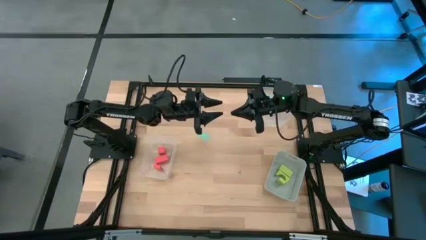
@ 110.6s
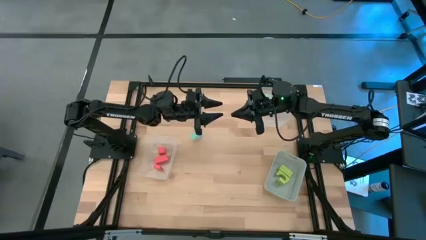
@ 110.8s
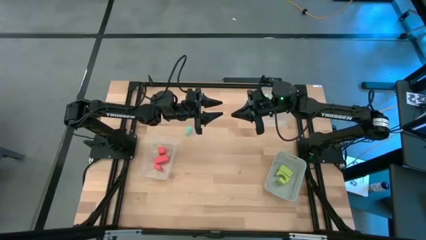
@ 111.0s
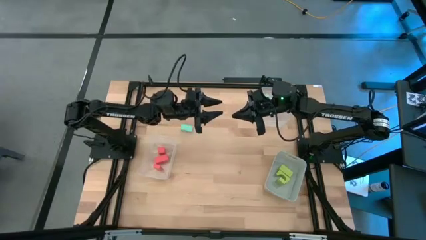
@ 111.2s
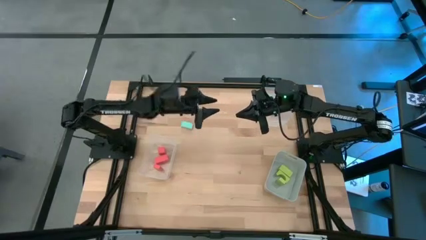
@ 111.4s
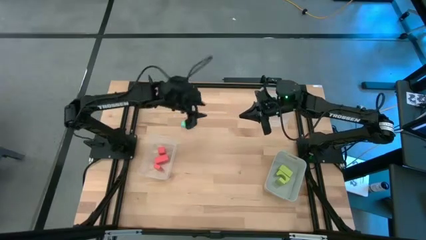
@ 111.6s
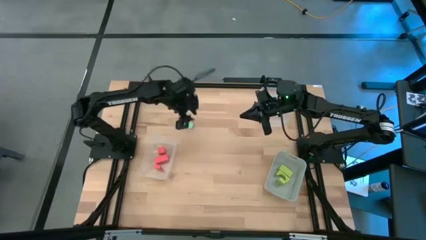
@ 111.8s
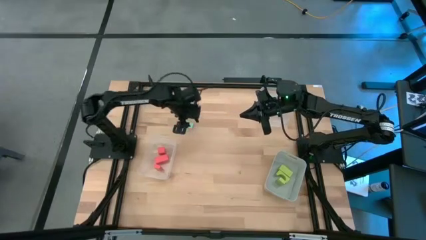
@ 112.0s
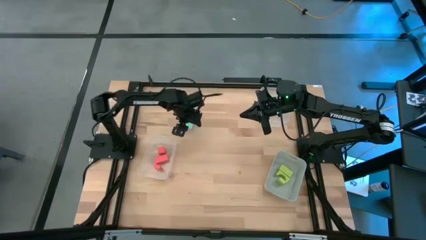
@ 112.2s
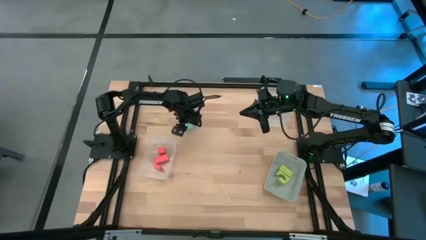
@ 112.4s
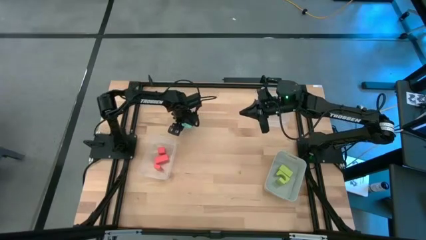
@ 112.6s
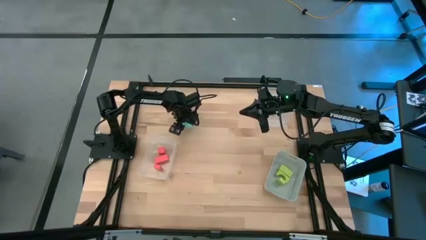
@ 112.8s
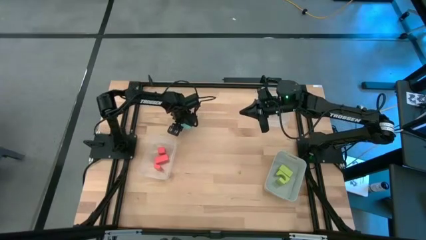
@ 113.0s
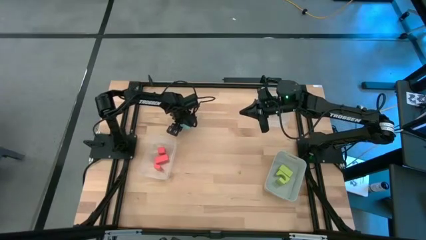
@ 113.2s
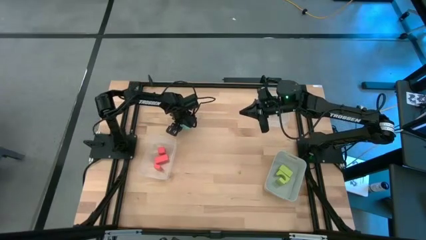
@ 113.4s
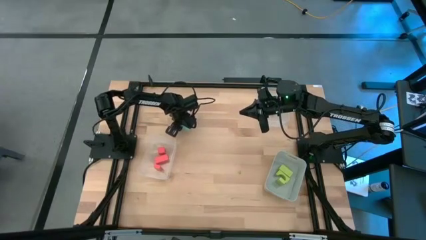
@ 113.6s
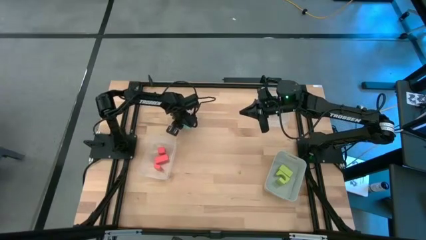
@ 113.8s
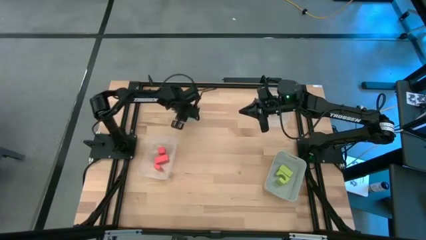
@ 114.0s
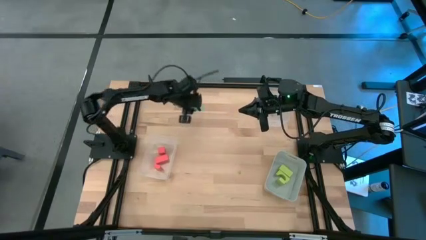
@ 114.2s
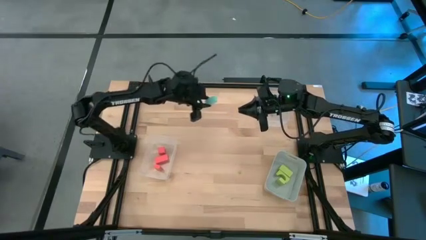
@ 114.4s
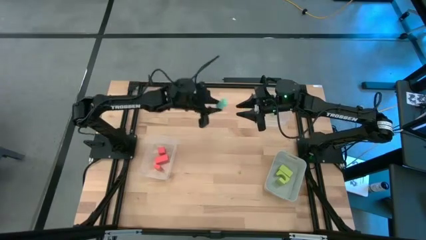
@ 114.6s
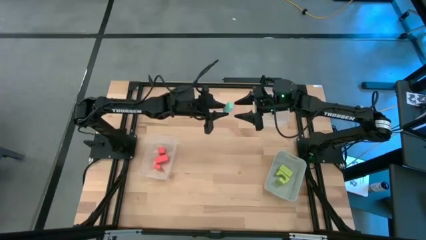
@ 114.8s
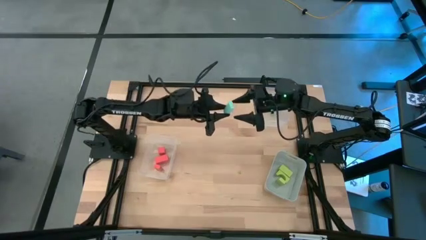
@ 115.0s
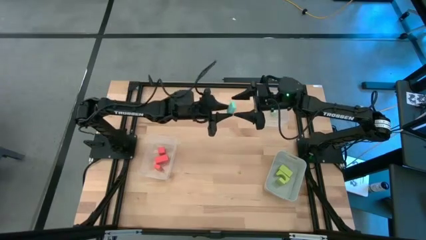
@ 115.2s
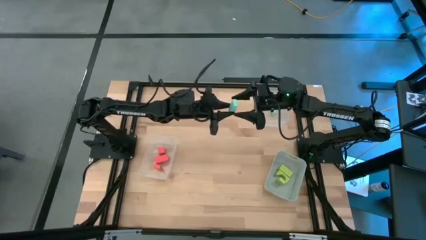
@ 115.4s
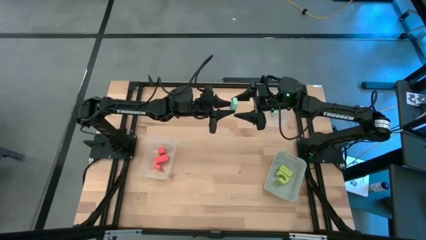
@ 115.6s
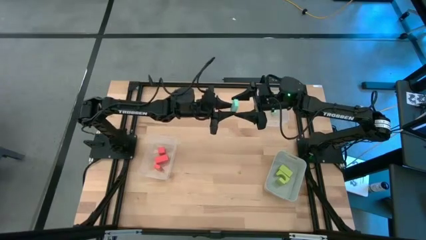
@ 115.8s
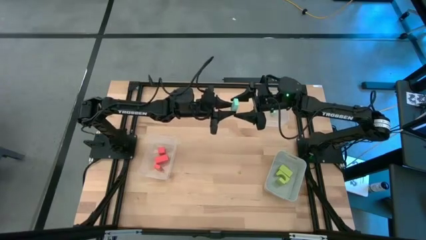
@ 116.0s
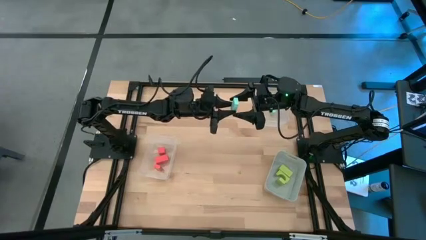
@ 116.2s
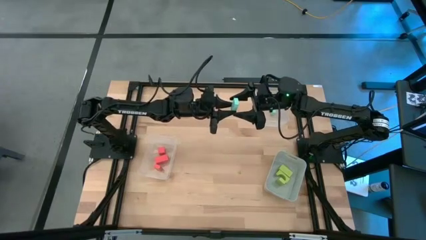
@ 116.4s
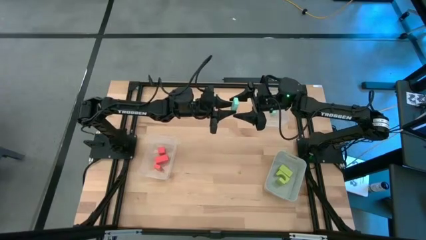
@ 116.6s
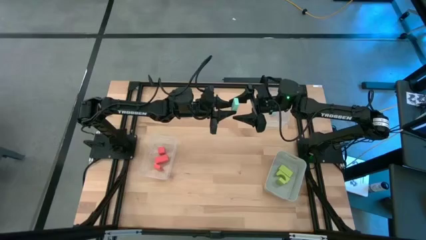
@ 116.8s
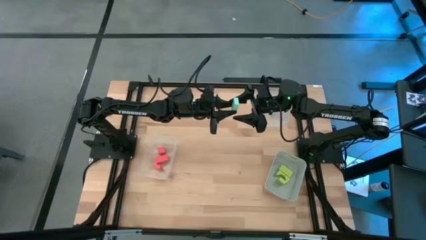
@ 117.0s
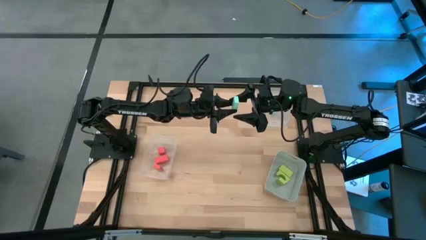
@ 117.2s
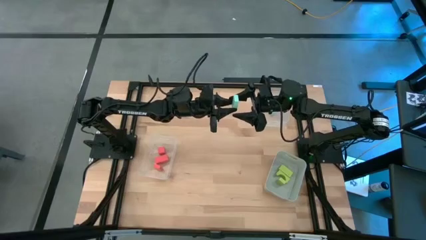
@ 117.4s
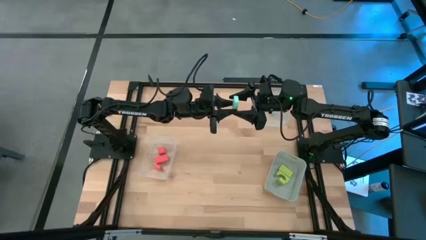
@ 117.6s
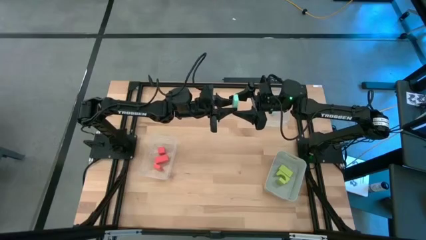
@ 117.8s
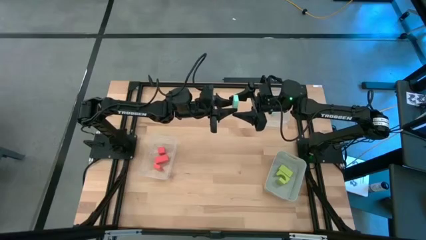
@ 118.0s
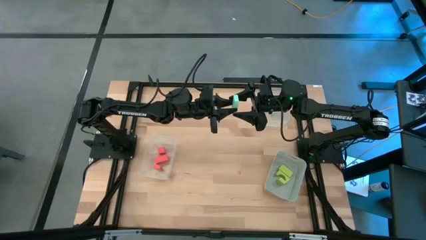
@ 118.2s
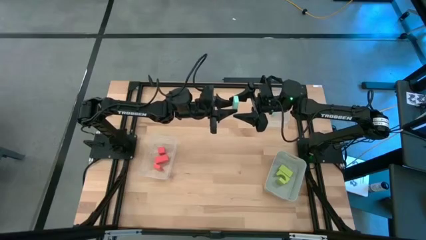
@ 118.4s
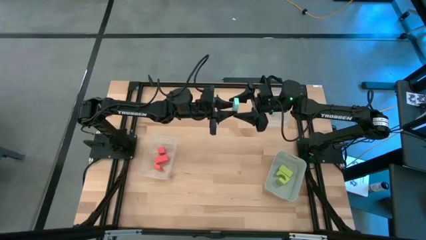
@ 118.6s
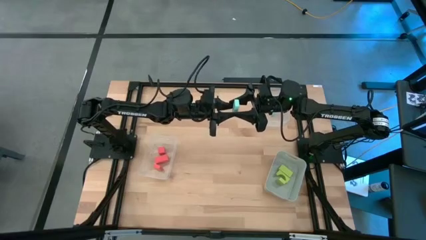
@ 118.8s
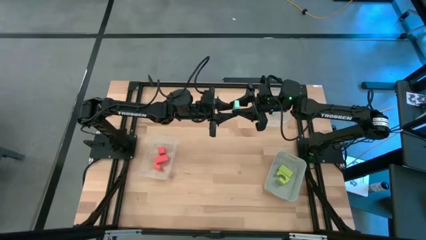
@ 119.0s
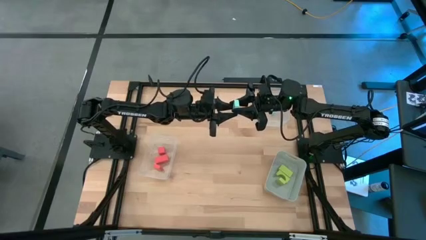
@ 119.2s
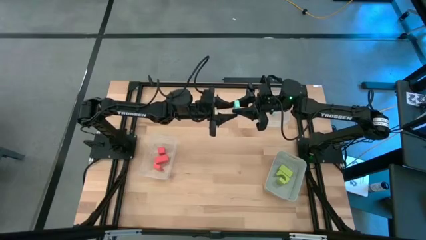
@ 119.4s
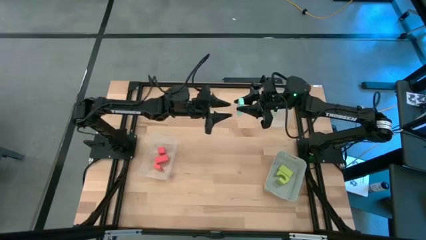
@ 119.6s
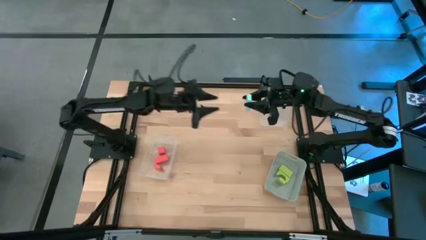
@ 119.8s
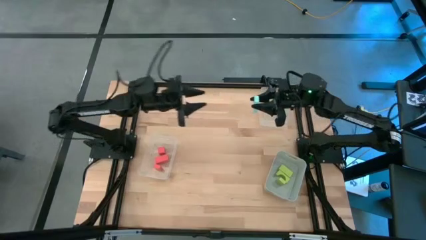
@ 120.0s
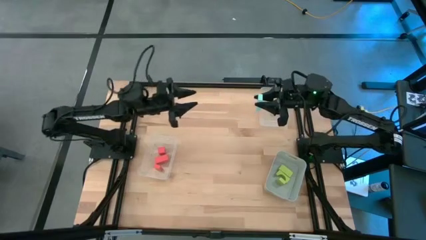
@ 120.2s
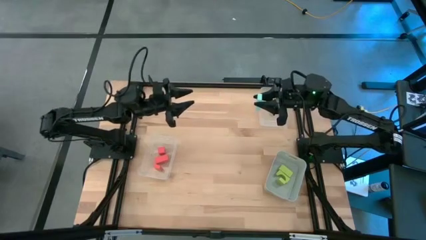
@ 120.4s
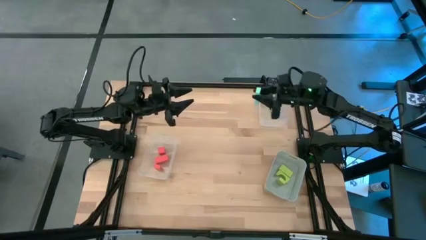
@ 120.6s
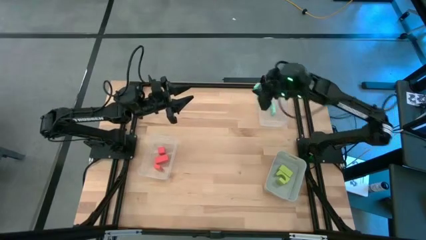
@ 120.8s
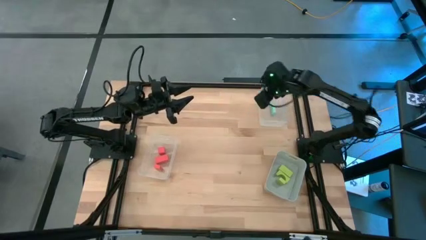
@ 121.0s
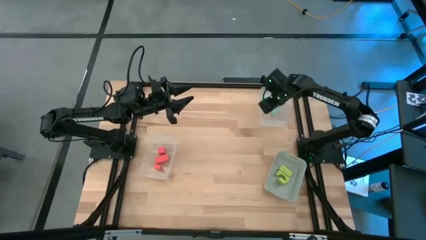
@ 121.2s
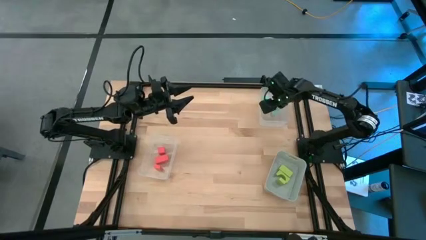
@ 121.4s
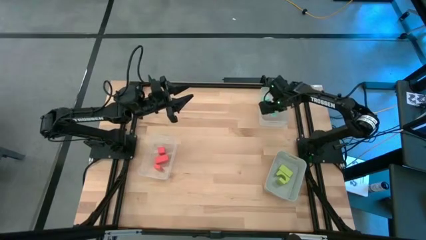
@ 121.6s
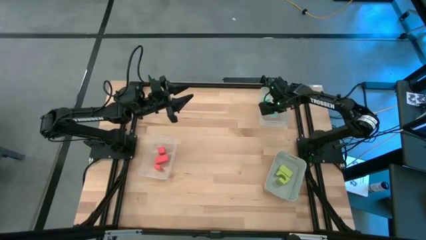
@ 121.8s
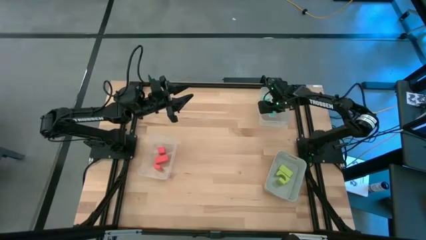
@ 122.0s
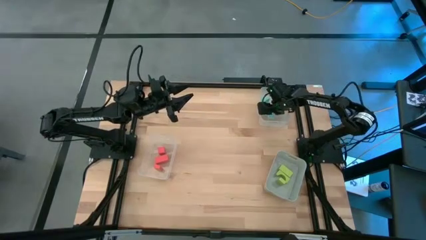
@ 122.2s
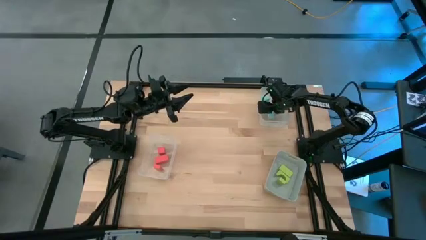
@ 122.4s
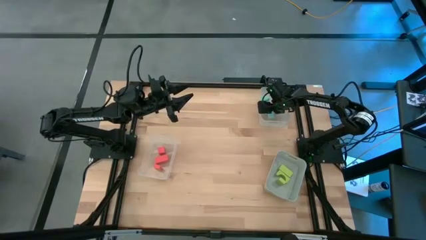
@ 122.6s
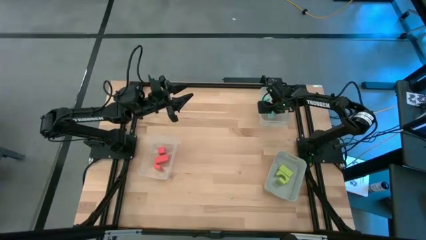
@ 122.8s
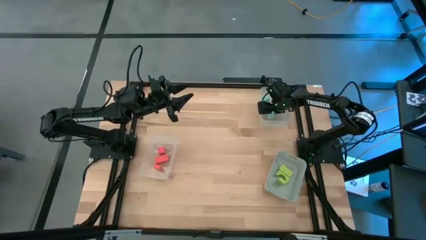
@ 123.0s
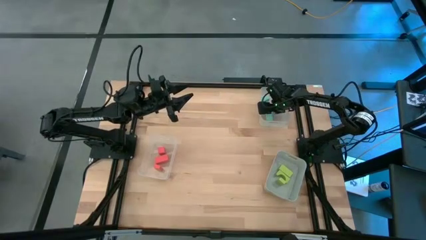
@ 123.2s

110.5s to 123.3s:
Task: Sort & place blocks by color
Put the light blue block into the top transparent bin

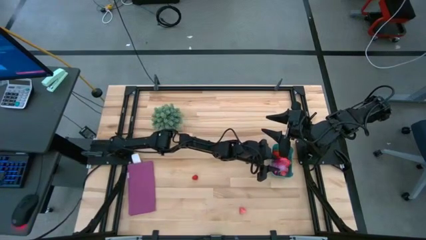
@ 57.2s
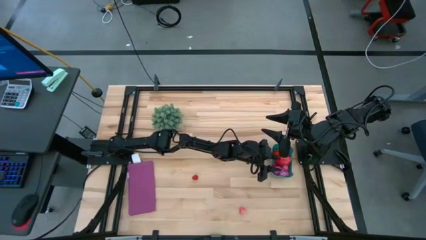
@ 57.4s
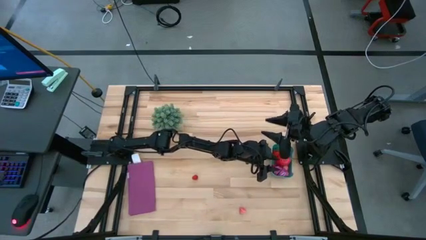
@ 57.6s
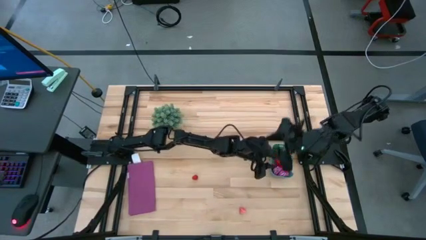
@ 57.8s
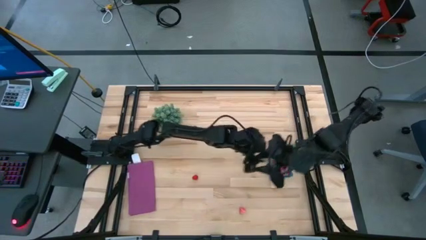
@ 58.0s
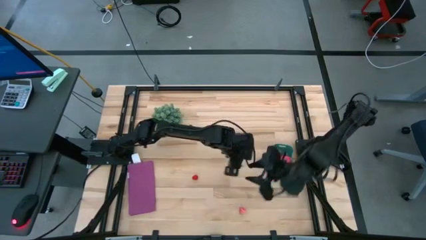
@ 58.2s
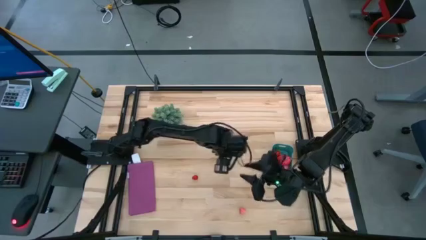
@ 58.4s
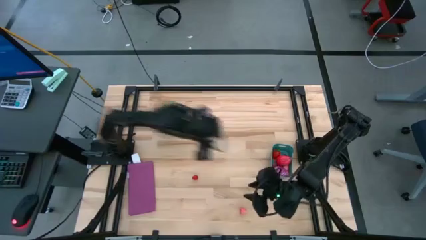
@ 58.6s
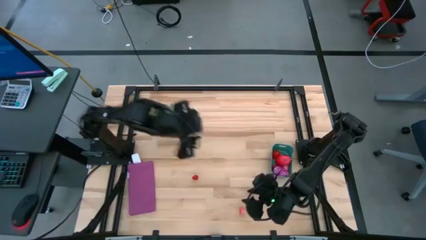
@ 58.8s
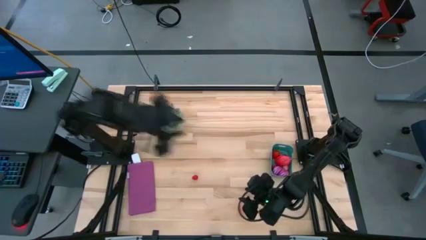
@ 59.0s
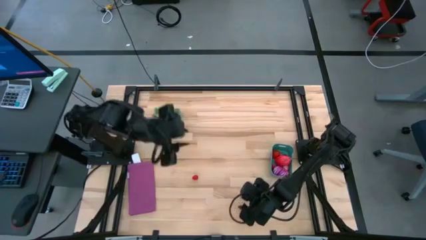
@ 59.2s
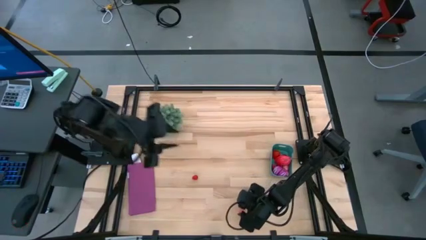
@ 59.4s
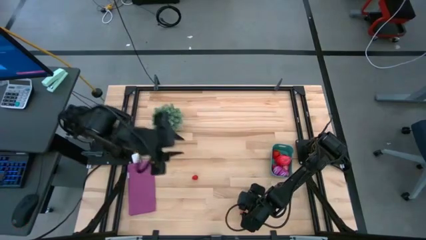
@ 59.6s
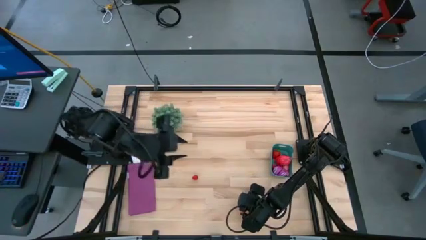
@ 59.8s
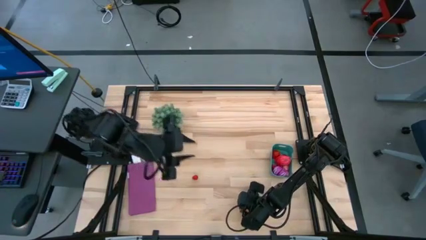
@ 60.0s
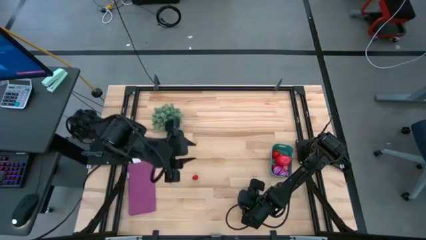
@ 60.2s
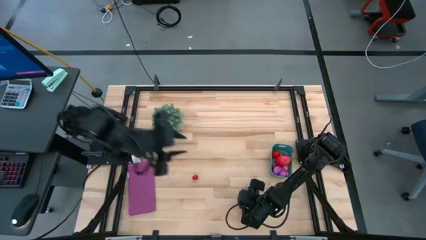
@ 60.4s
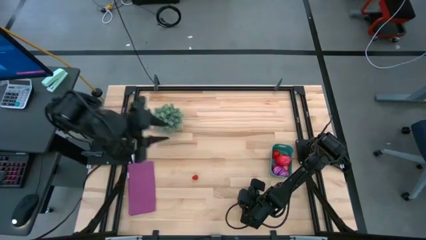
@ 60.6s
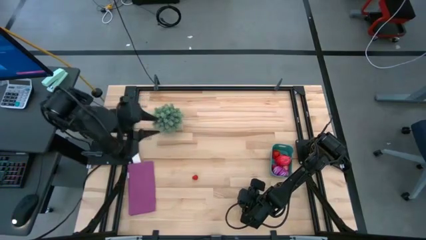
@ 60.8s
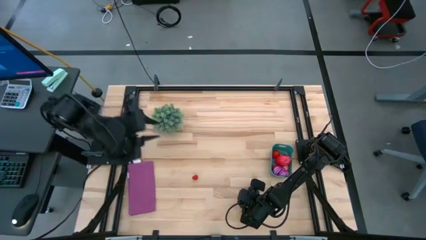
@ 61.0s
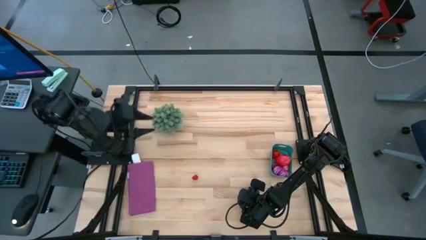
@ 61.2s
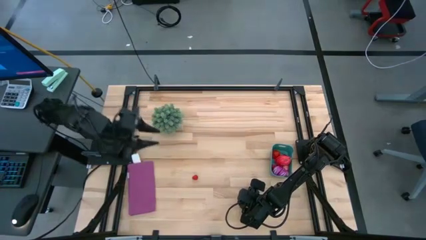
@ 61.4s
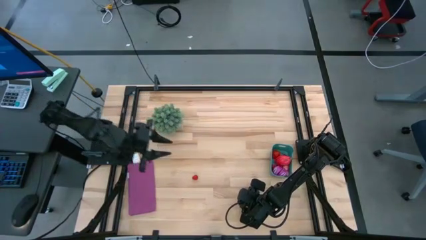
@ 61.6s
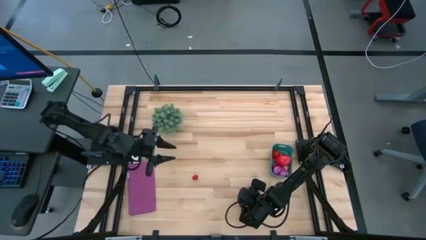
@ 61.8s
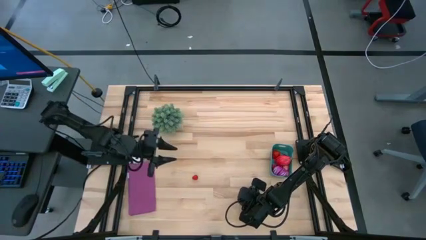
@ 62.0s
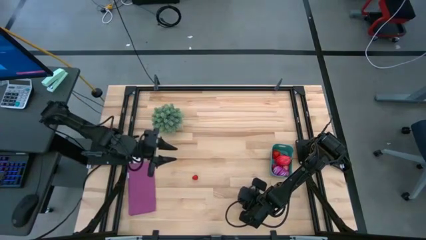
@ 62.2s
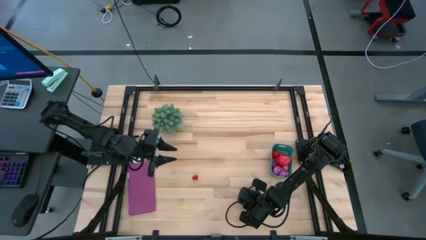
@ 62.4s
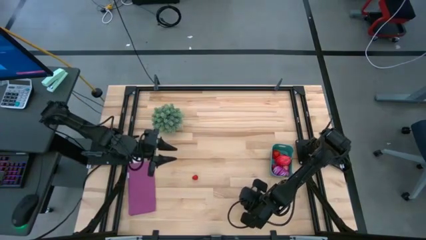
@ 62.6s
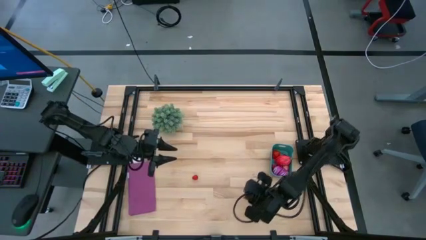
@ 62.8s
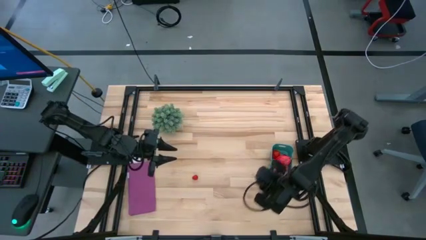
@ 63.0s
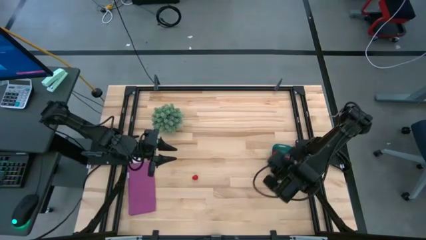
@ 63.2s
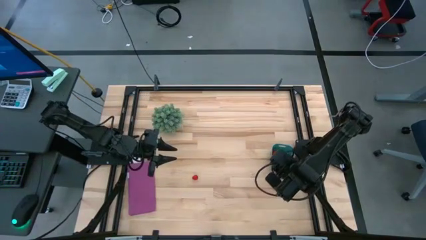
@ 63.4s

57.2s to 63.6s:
Task: Pick and placing Produce into tupperware
Put the pink peach into the green bin
